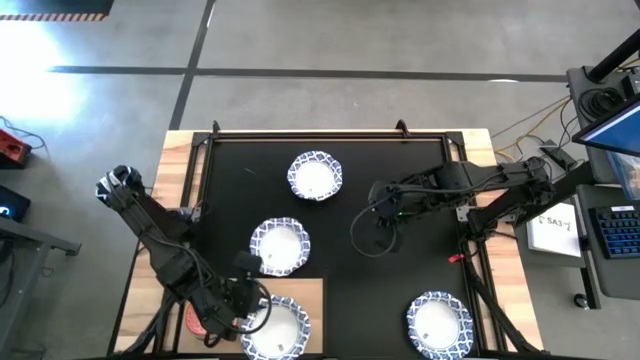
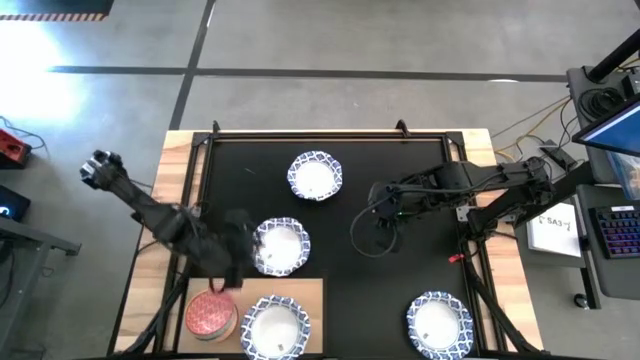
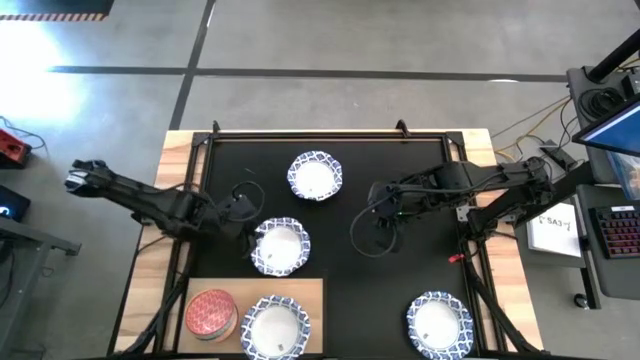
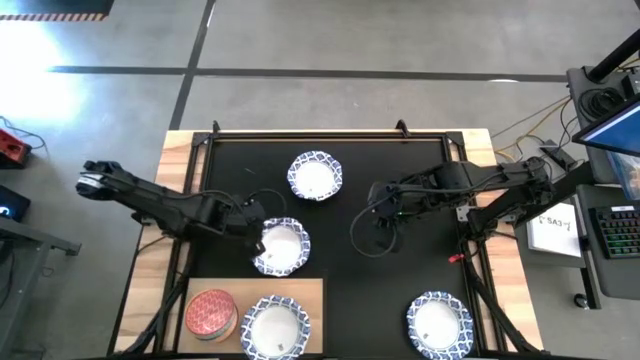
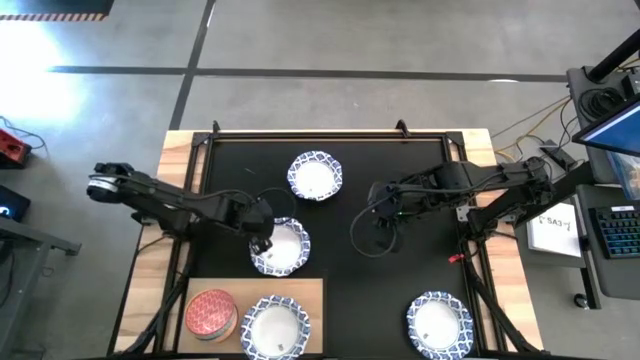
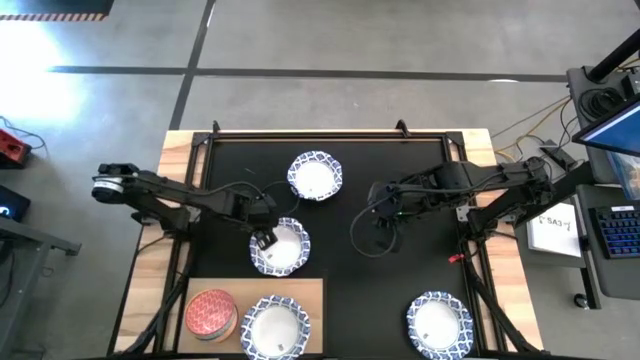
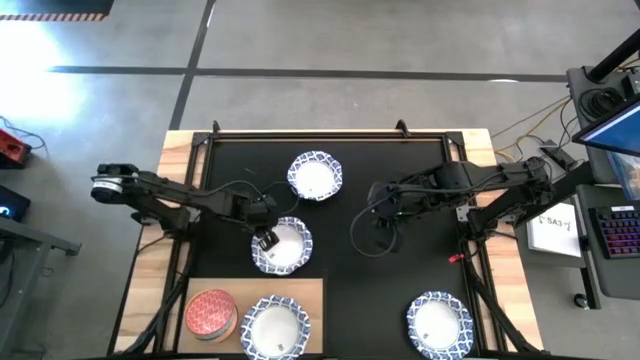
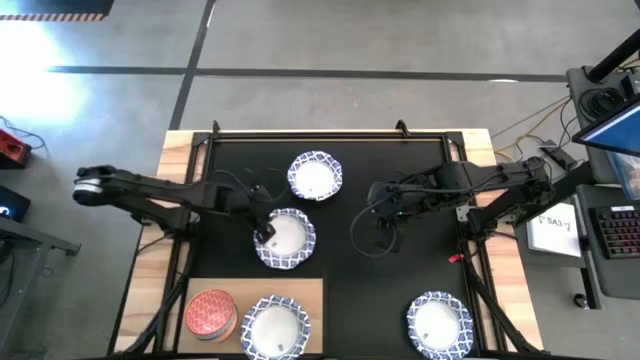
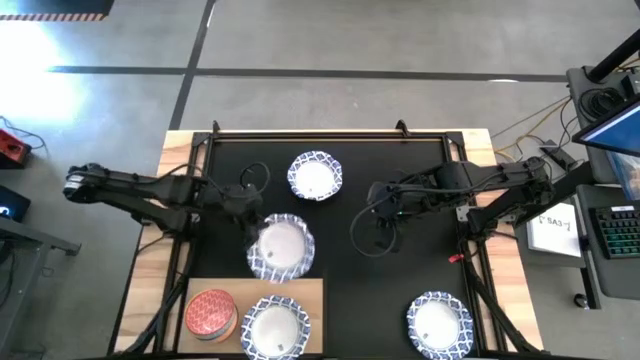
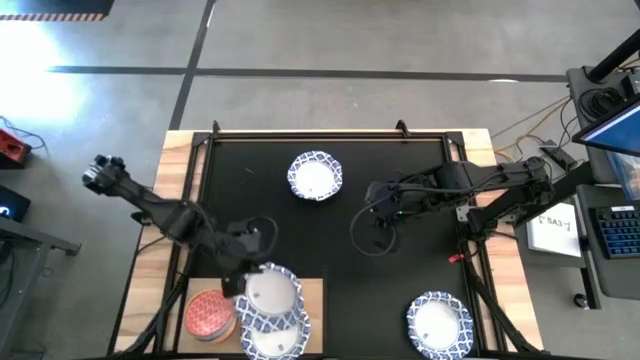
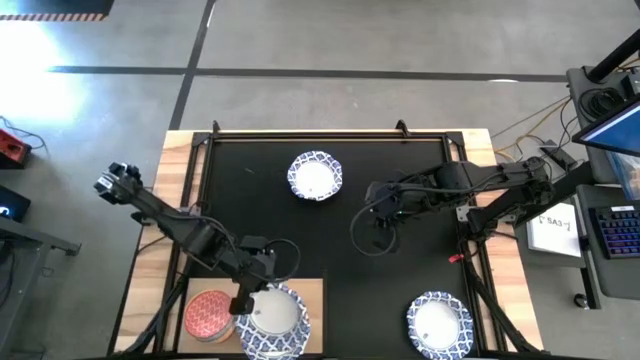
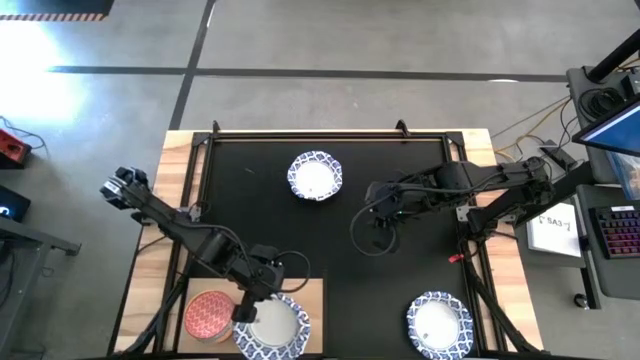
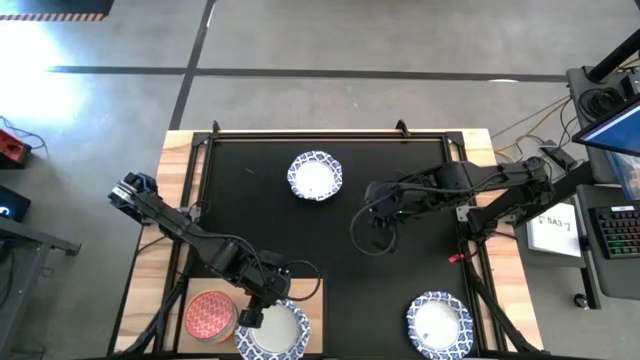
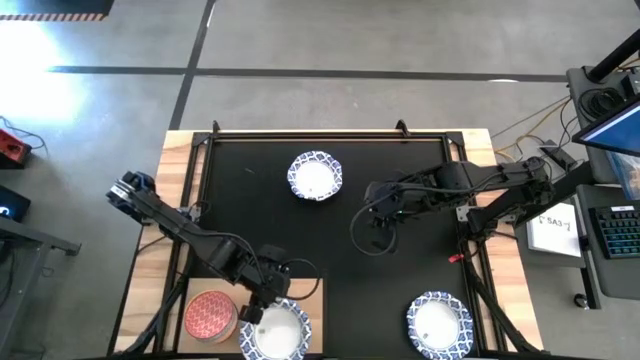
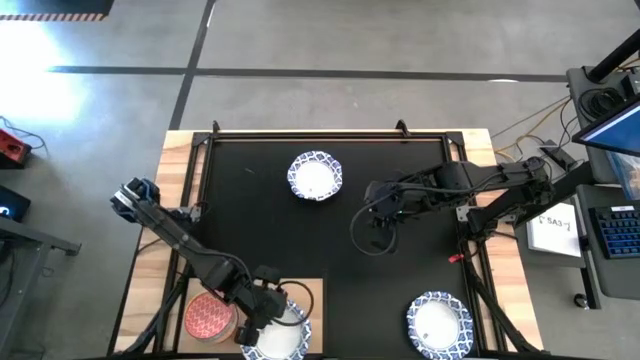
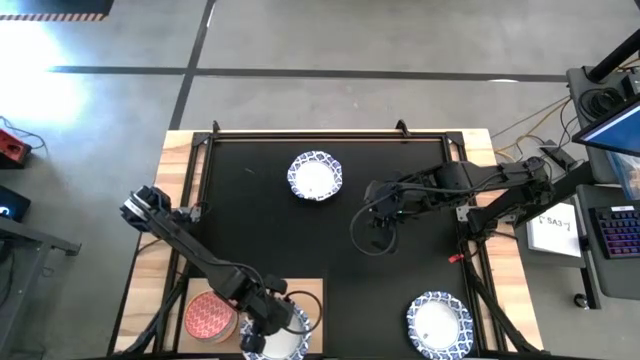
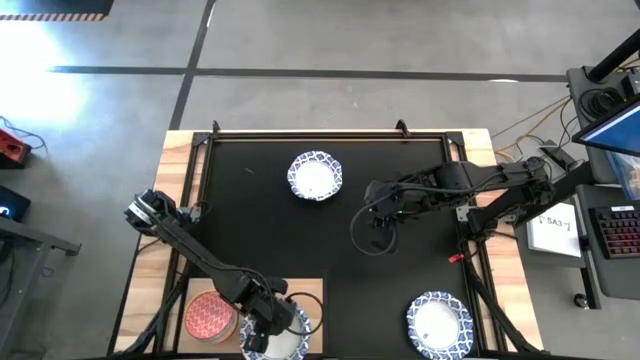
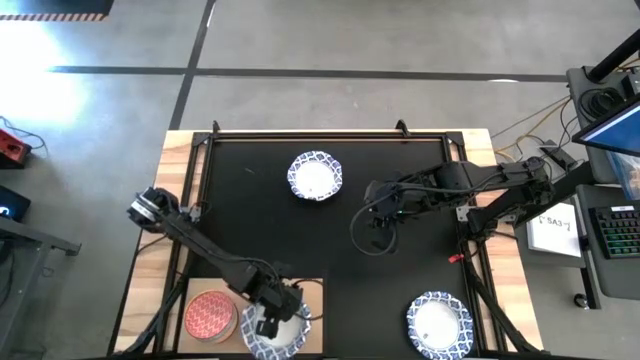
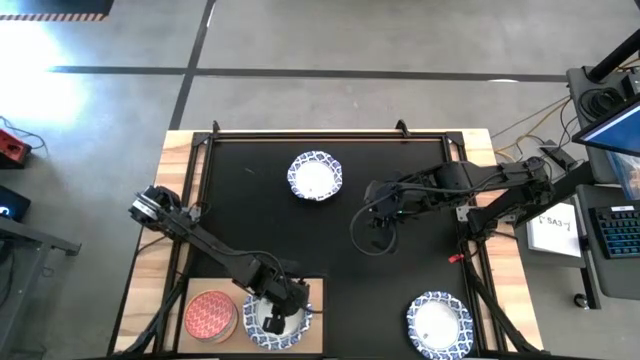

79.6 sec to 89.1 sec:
Task: Place and stack bowls onto a shelf
Stack the white patterned bowl on top of the white patterned bowl on the shelf

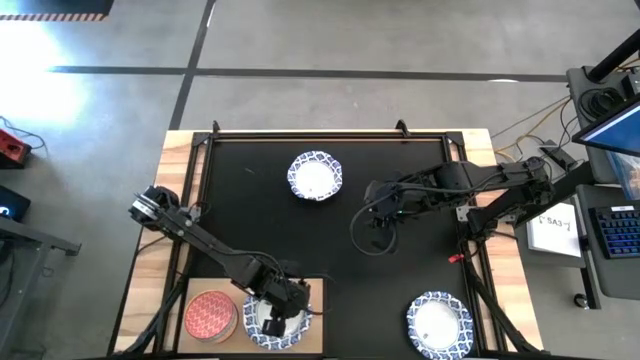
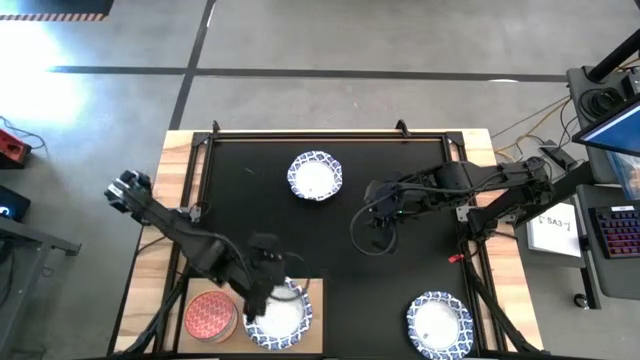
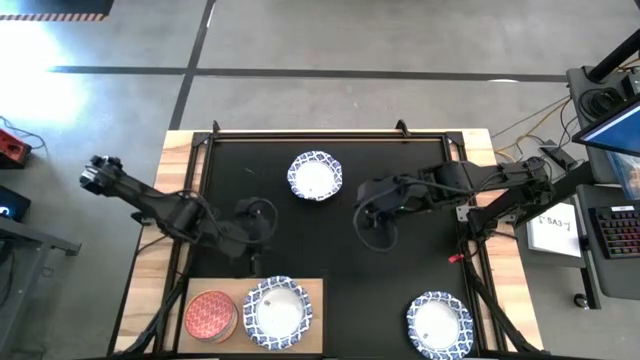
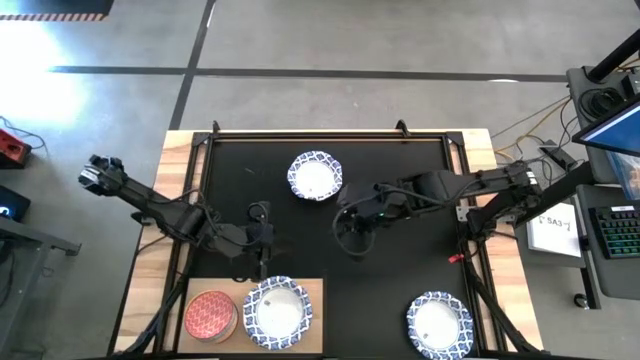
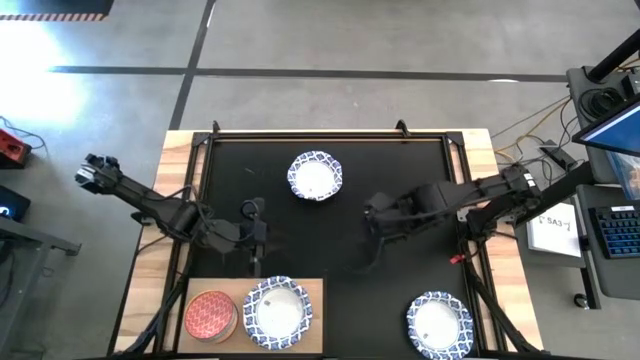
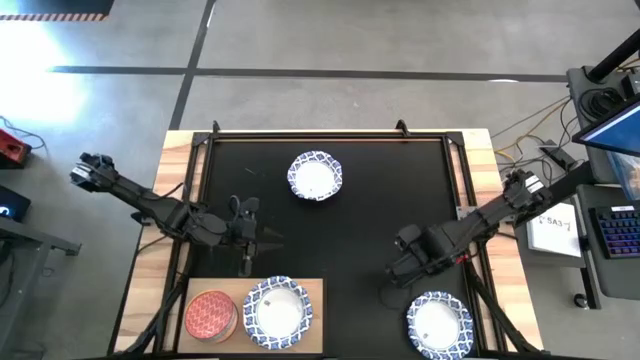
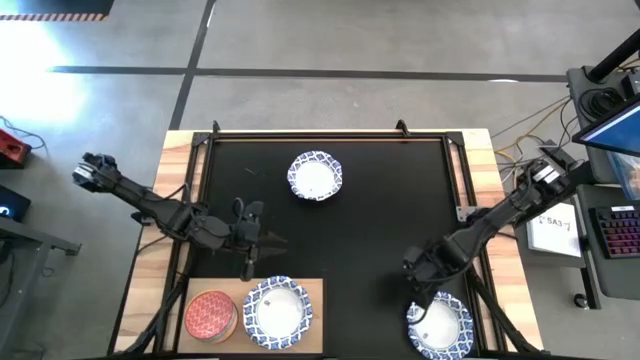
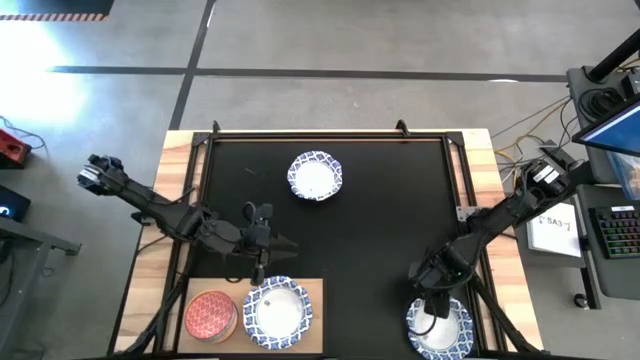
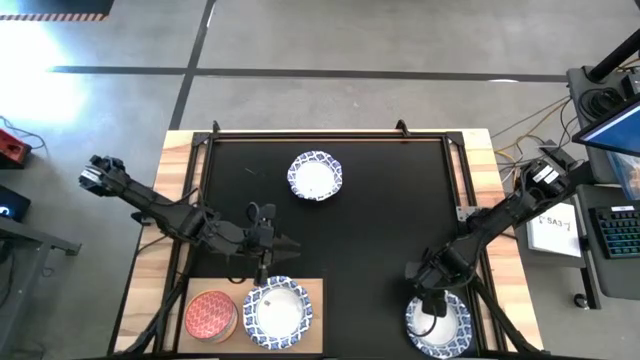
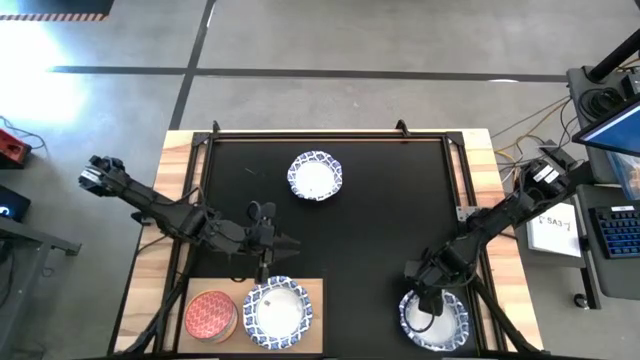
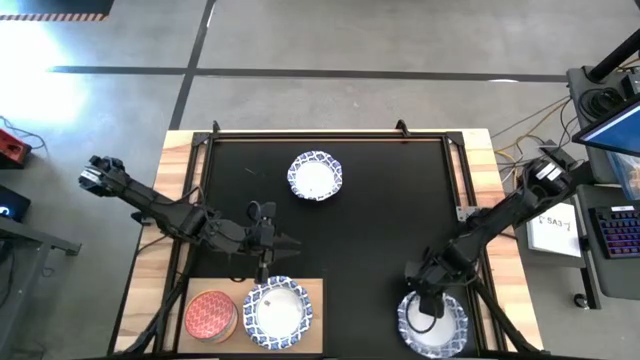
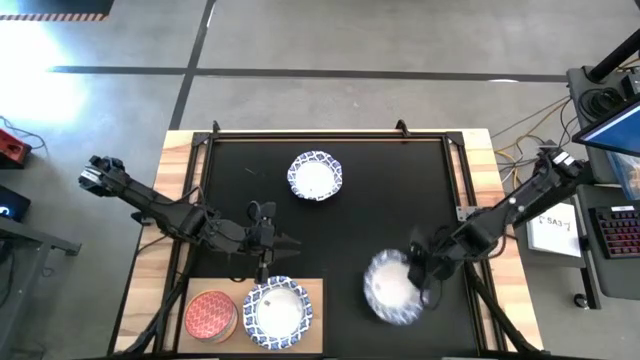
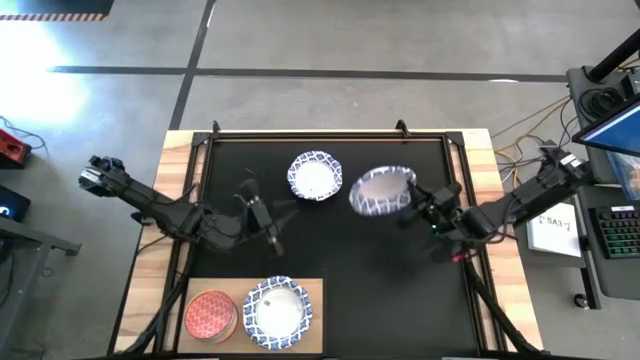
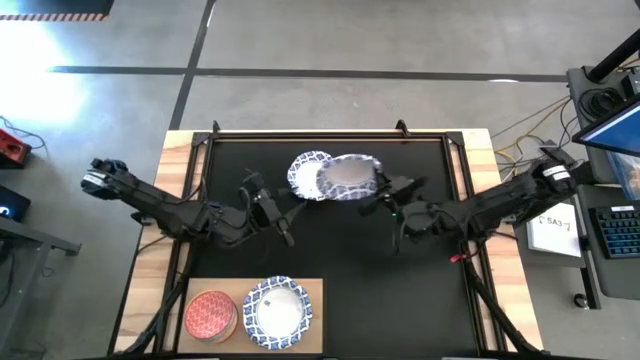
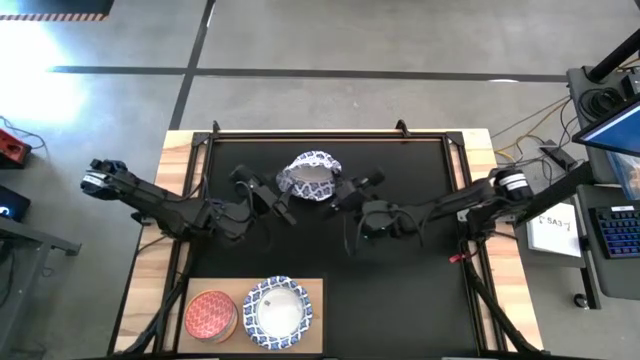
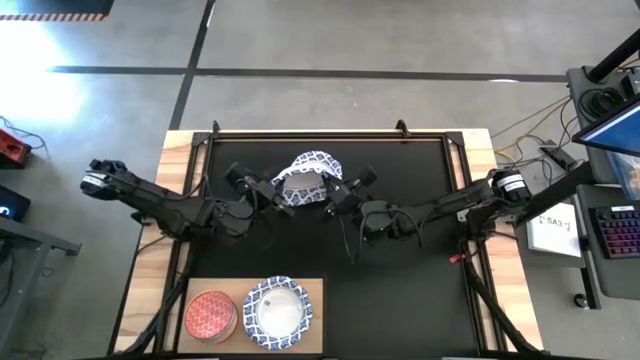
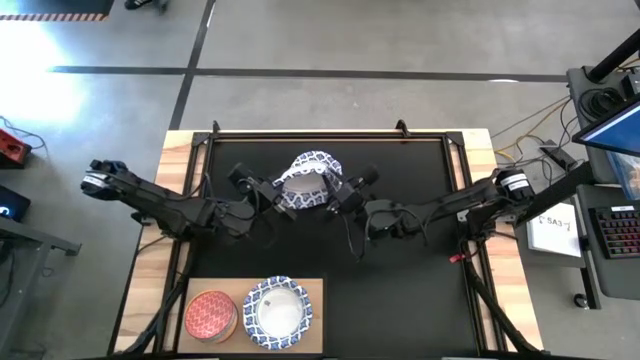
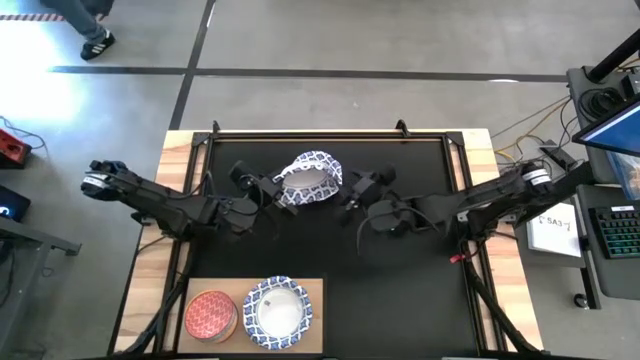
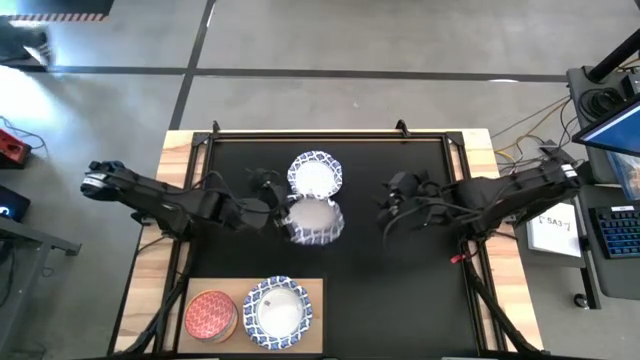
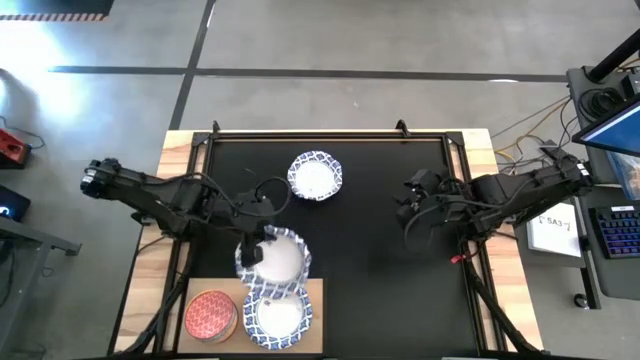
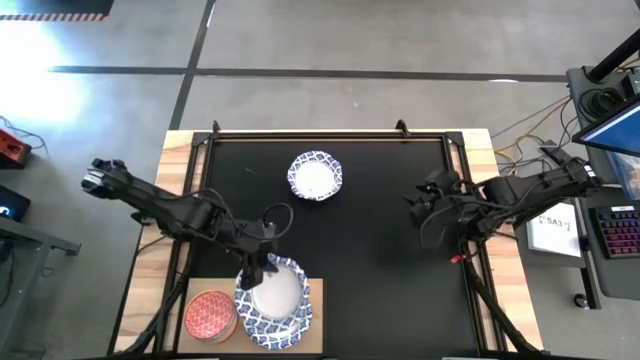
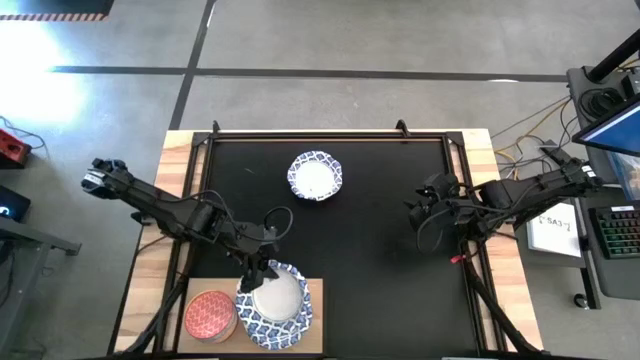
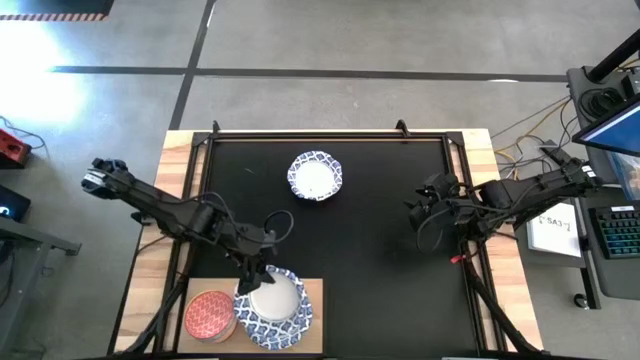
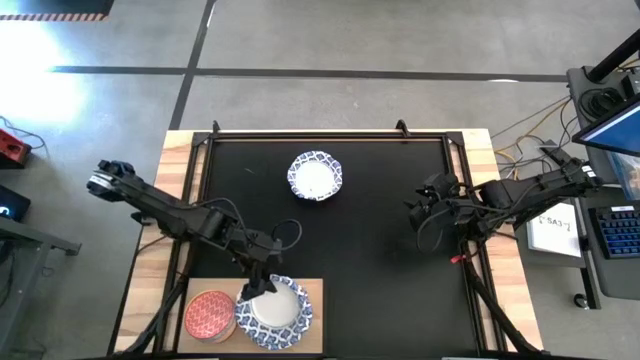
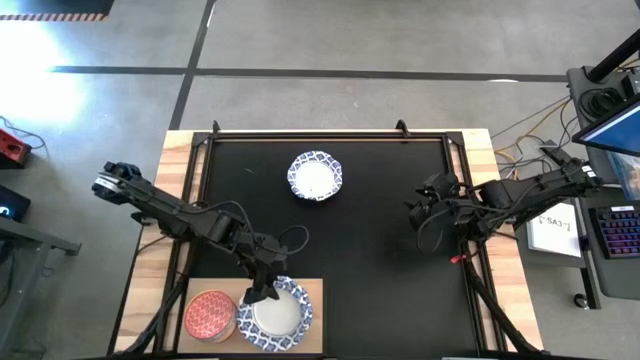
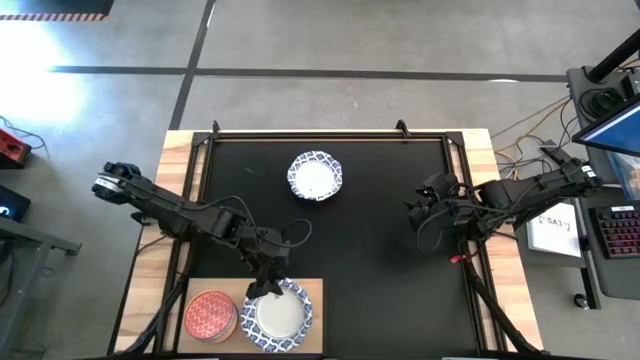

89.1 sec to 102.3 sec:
Stack the white patterned bowl on top of the white patterned bowl on the shelf
